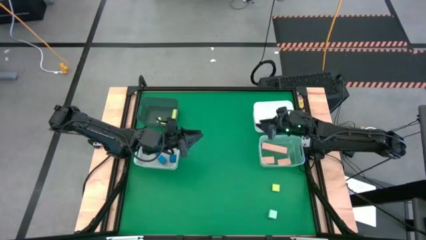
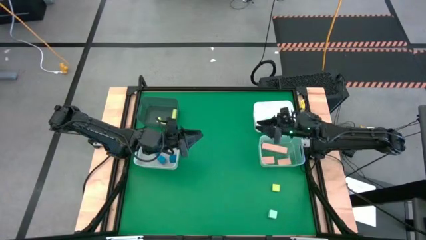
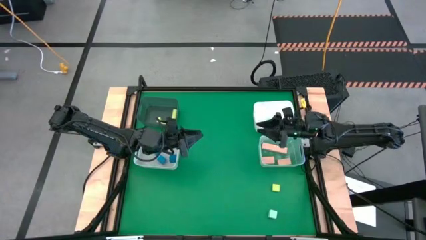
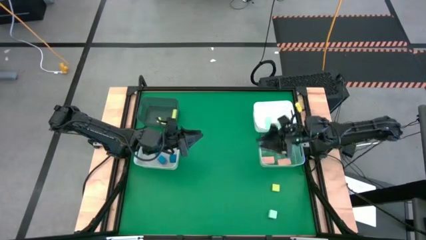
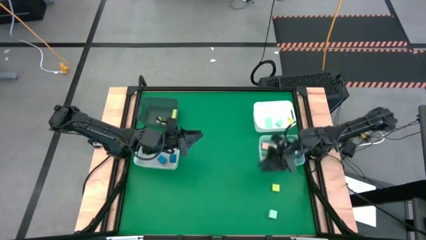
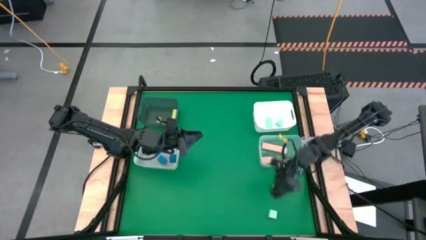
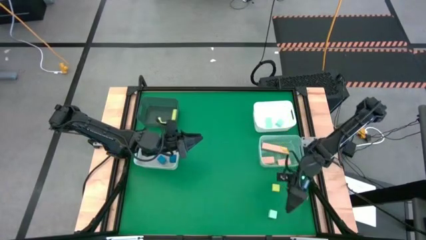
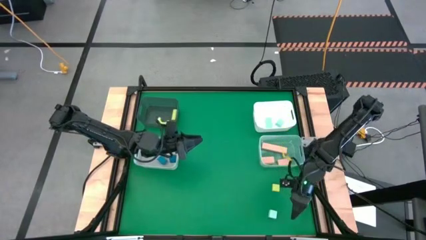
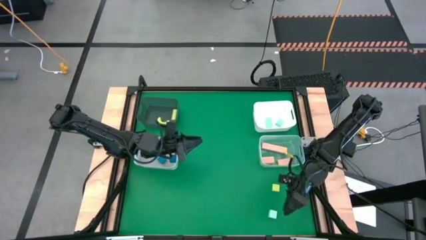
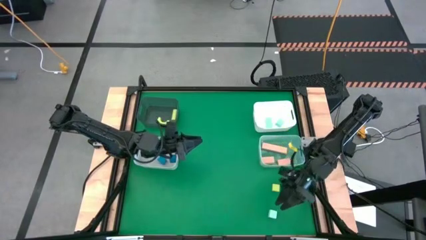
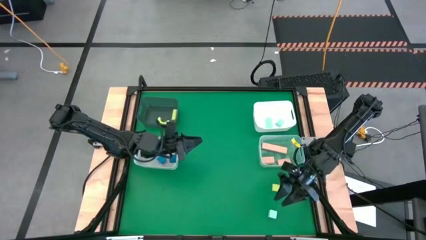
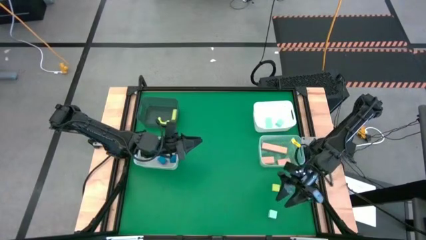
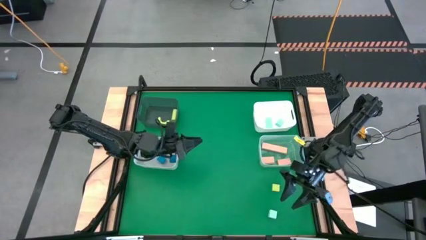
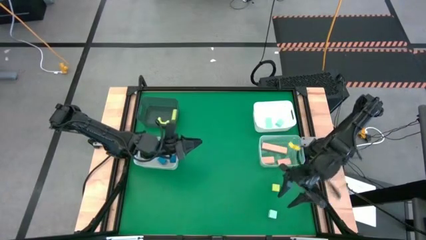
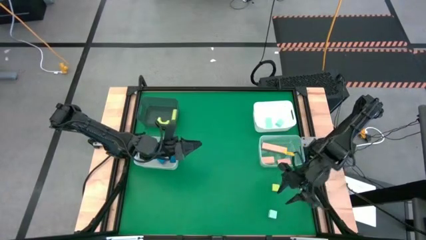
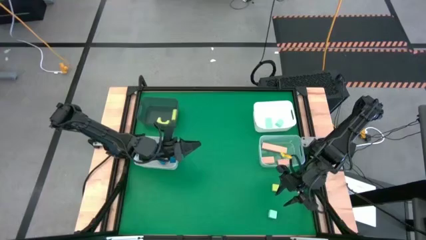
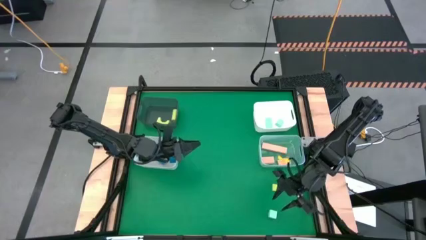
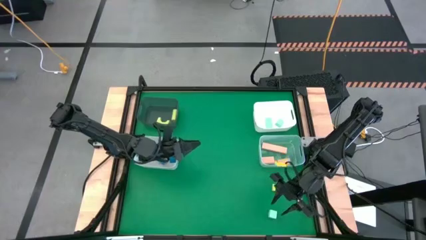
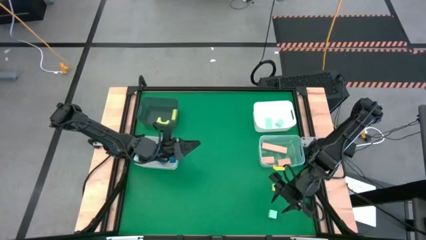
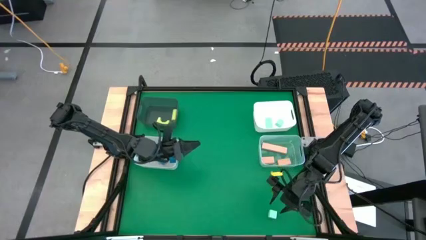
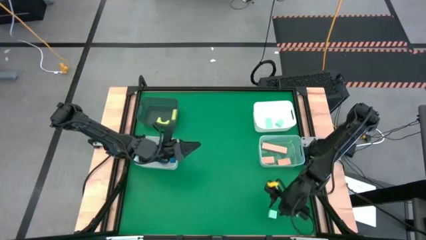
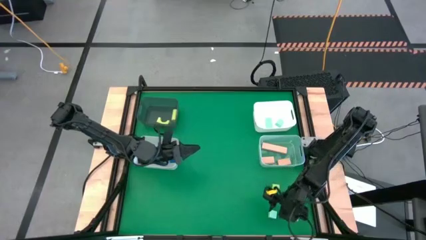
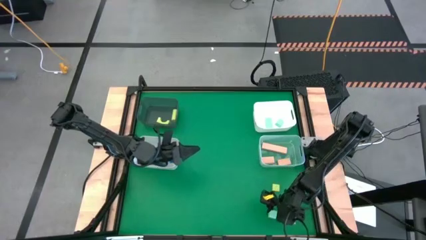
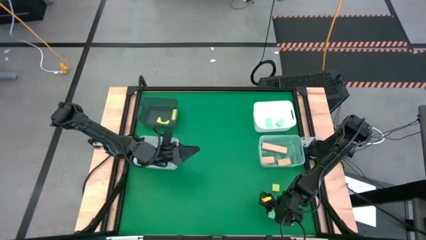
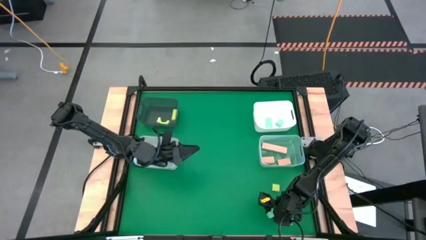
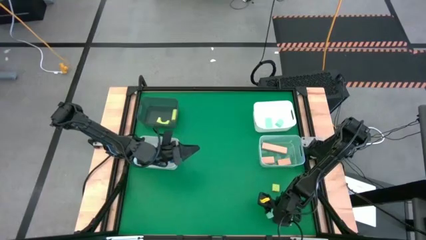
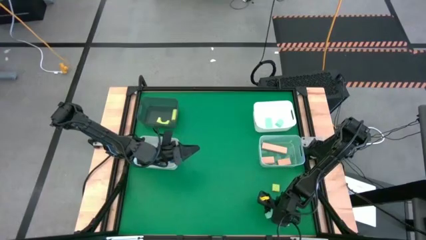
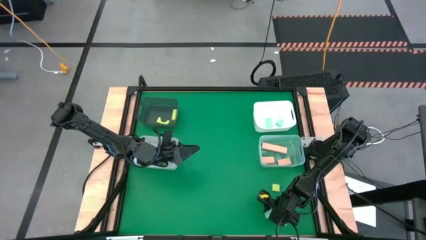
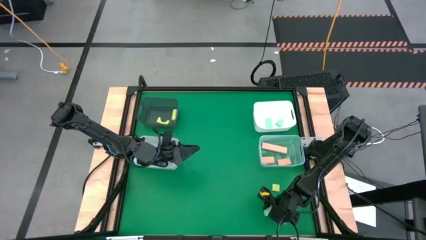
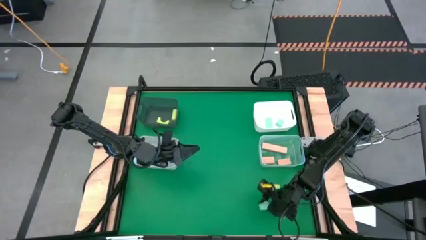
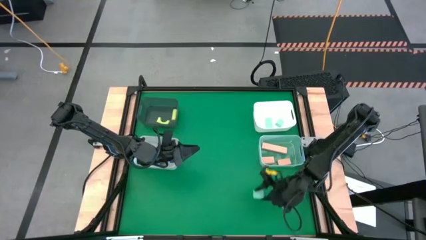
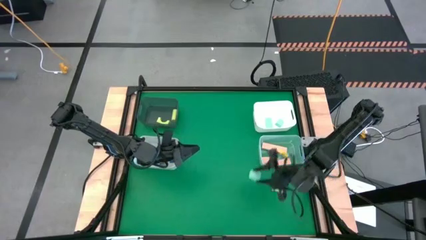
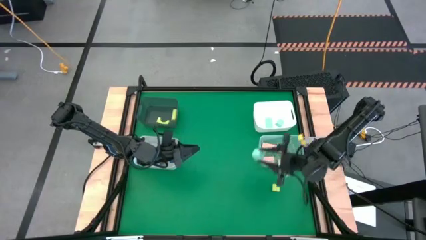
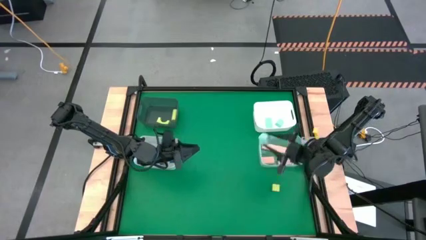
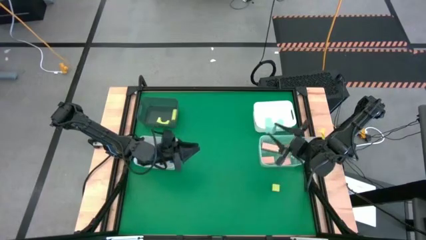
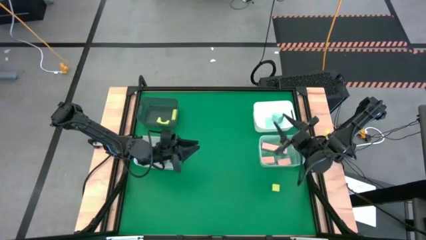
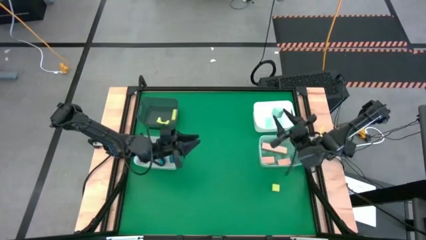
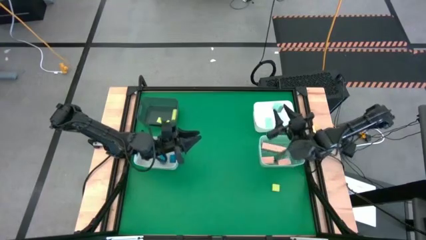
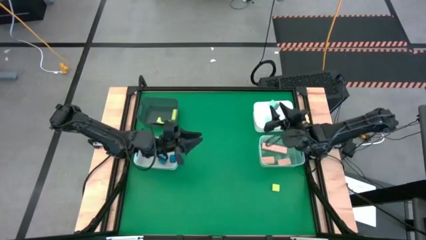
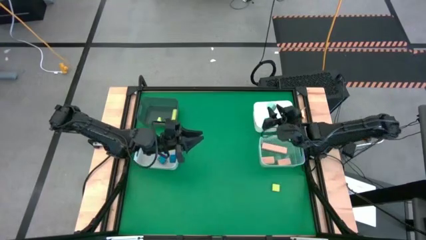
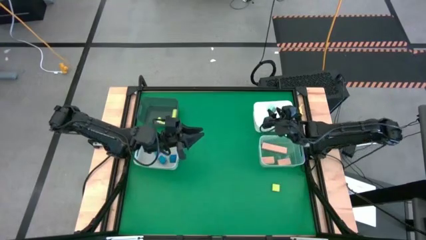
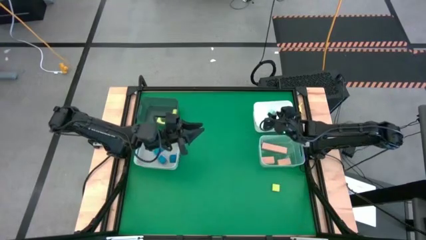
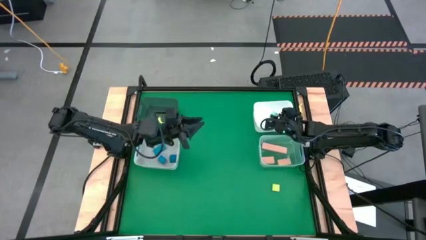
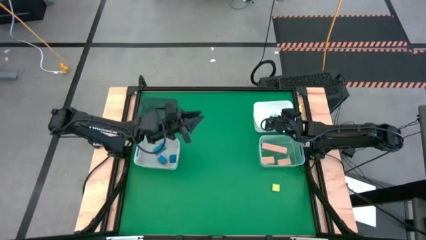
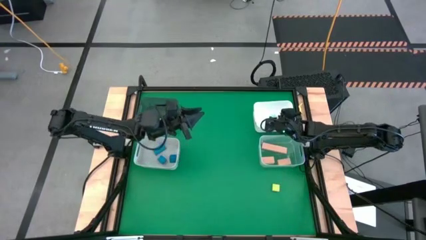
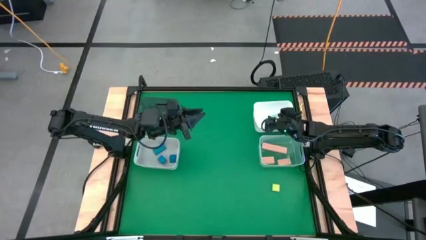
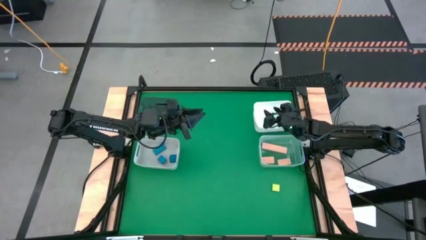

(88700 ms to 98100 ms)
Task: Sort & place blocks by color
Put the white square block into the white bin

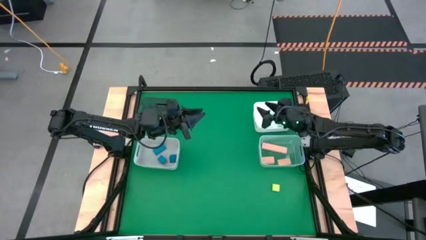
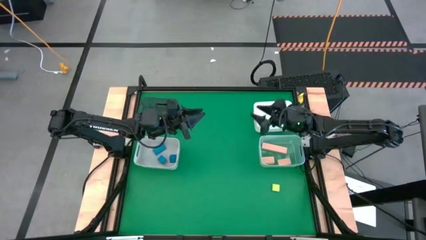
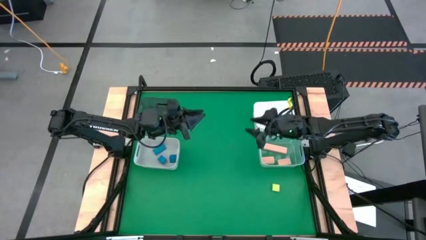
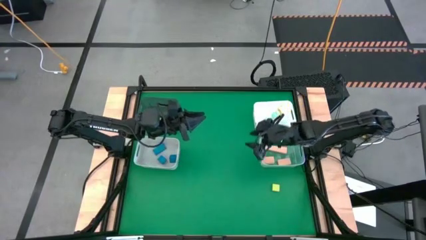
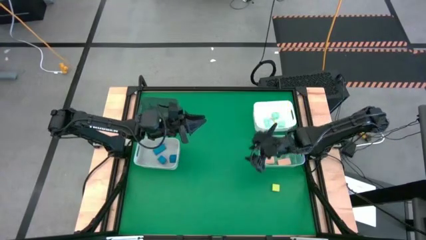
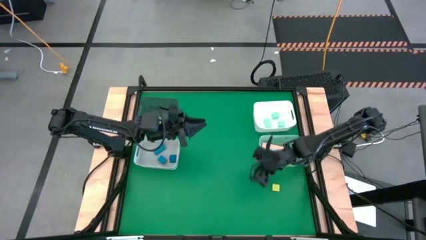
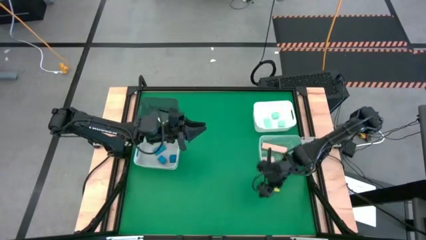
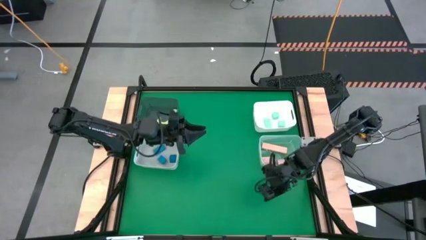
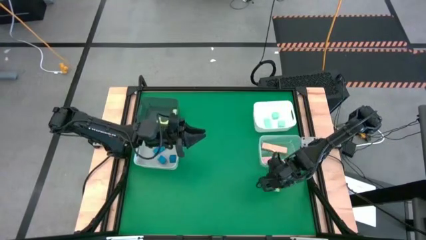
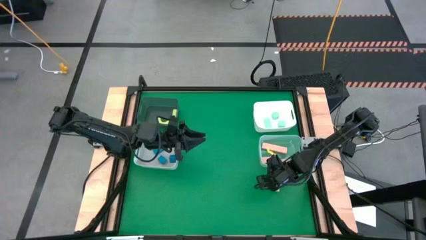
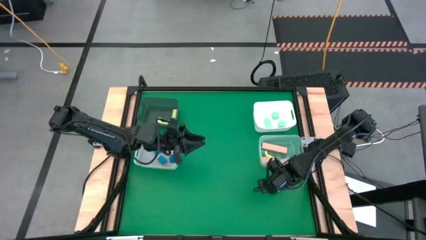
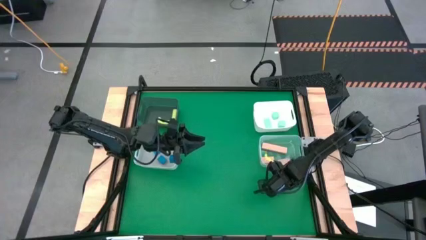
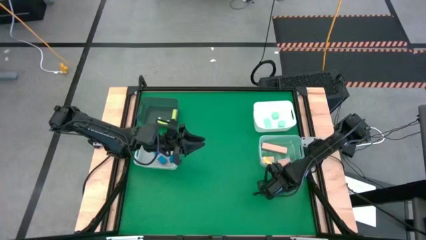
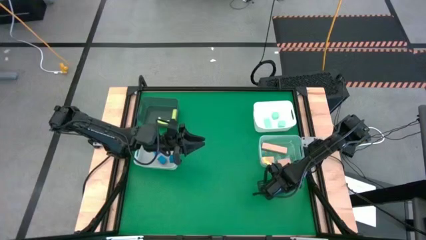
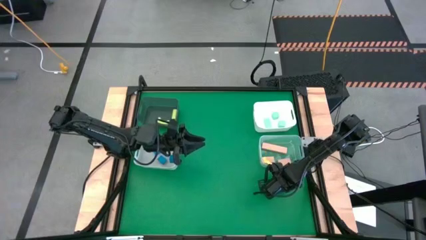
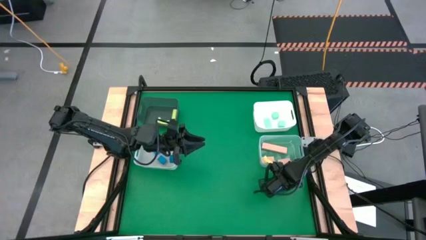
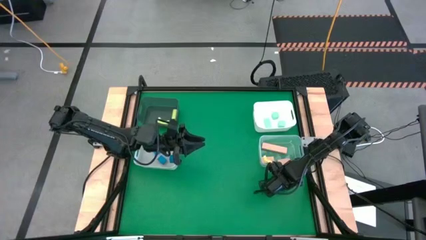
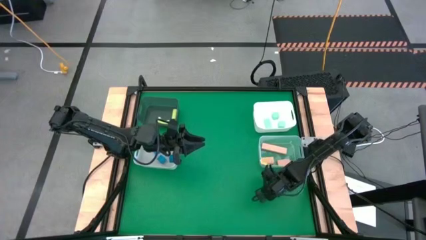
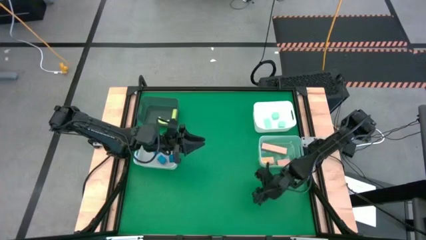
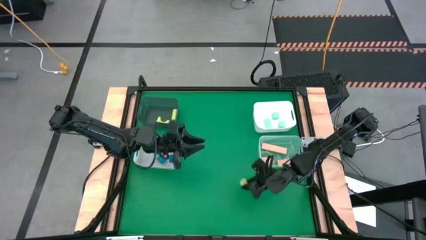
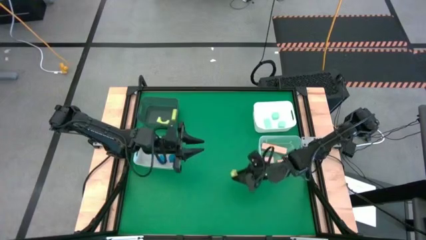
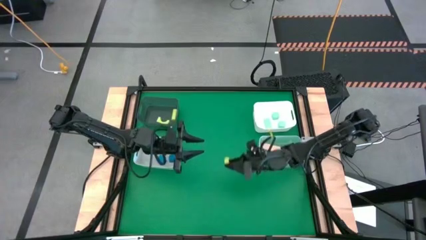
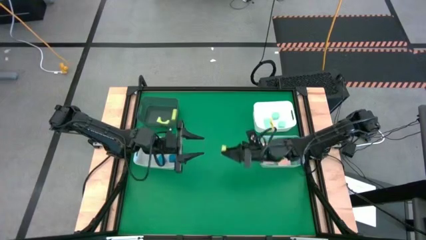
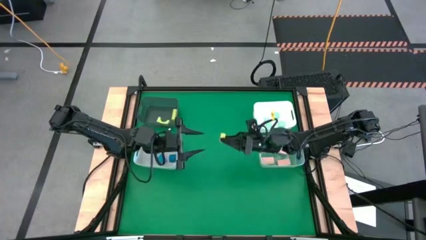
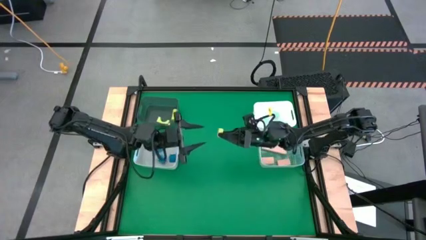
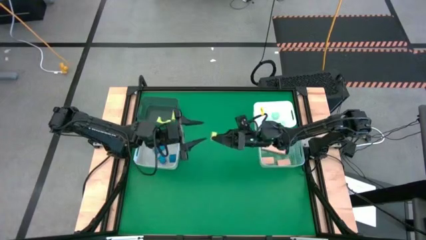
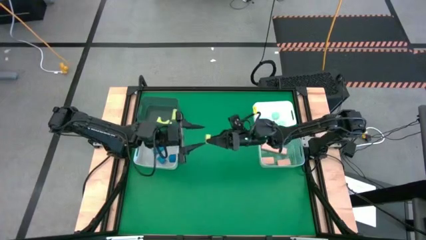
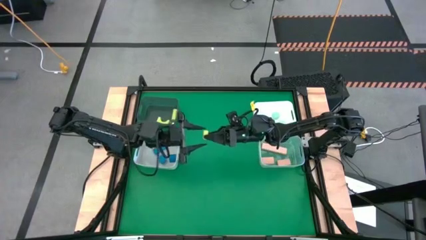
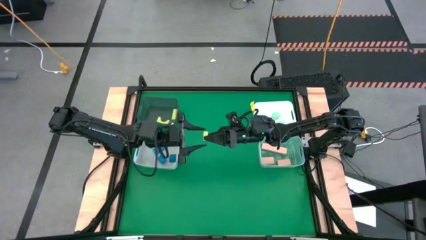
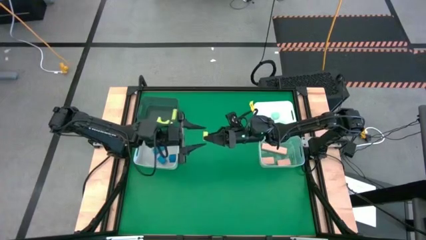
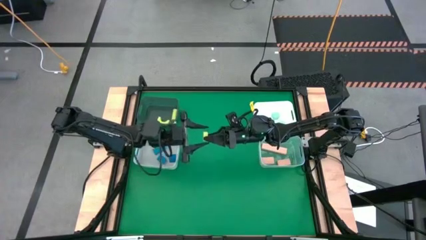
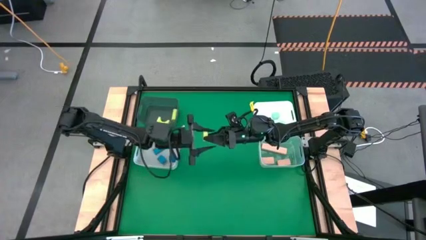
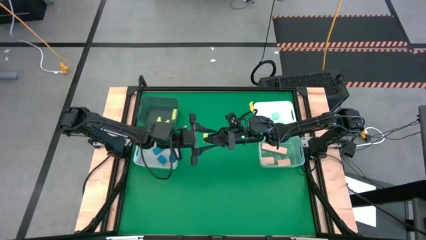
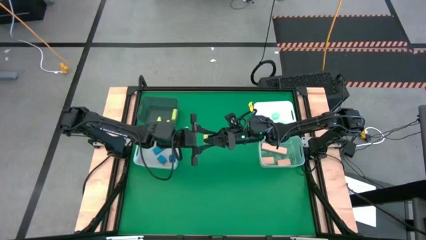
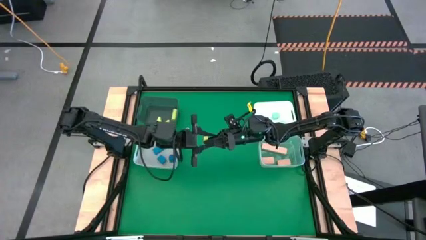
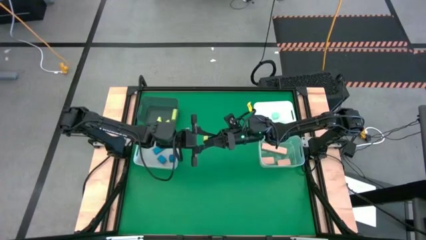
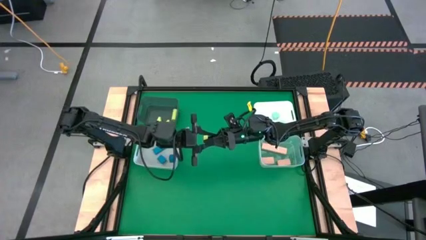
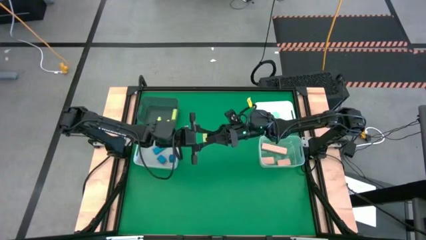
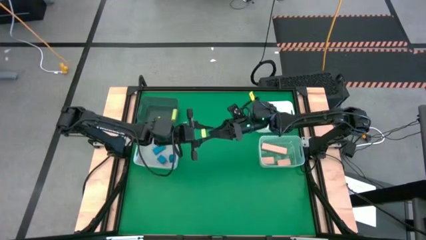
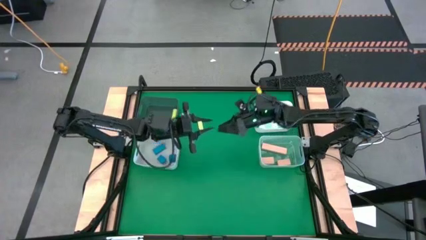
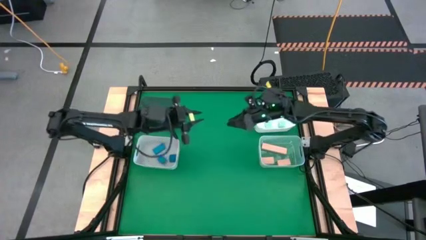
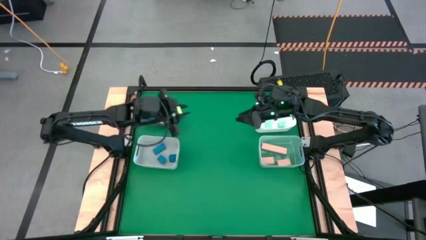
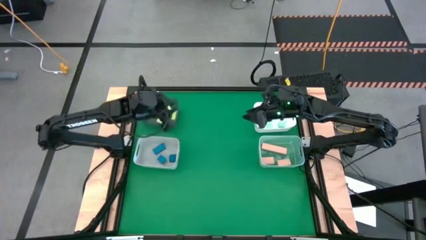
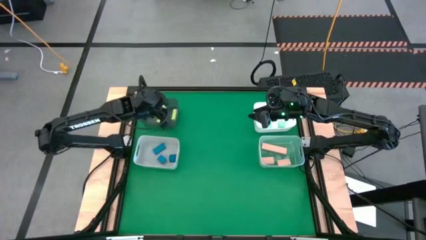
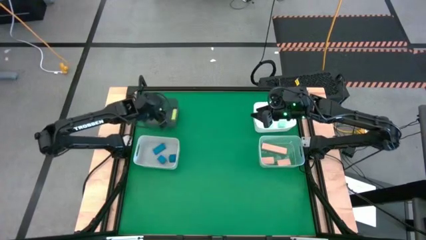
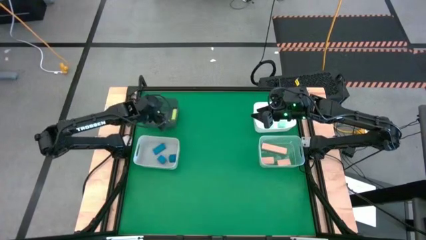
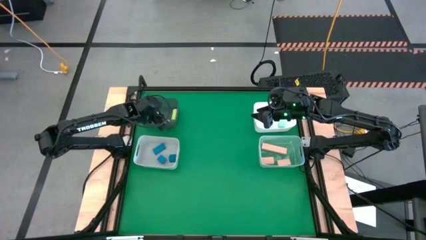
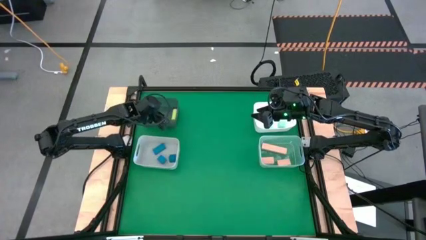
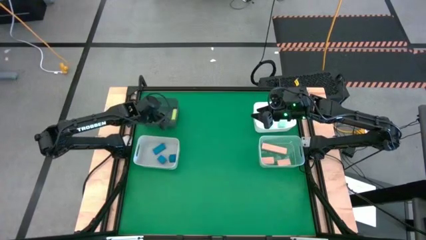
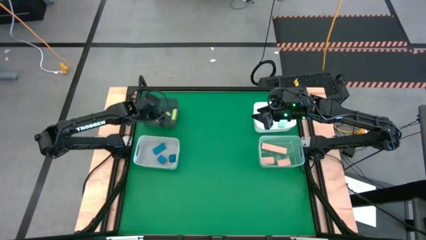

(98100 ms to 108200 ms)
Put the yellow rectangular block into the black transparent bin
